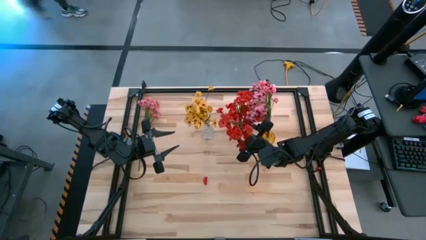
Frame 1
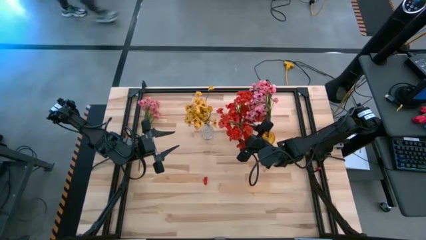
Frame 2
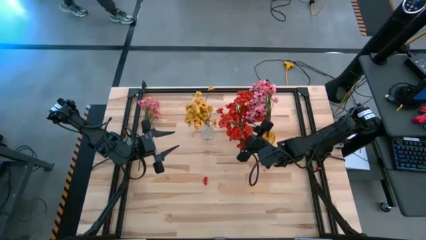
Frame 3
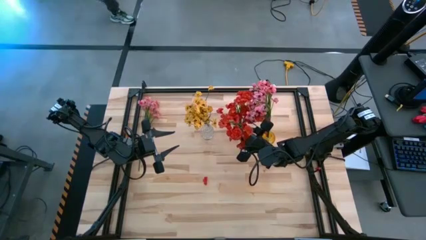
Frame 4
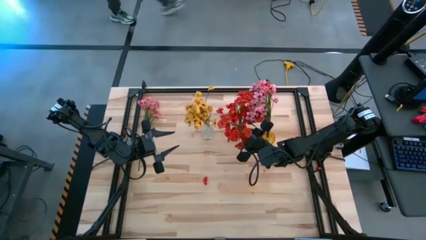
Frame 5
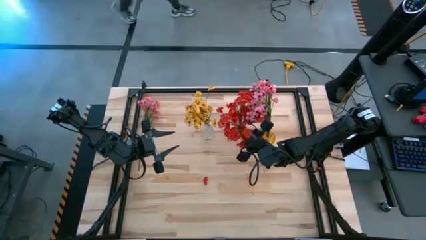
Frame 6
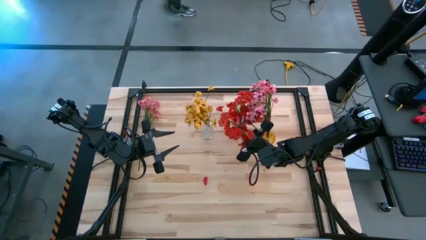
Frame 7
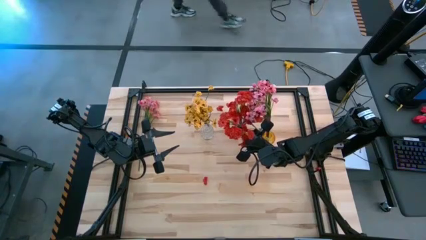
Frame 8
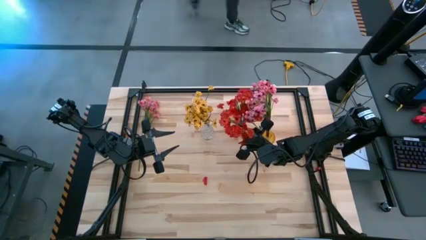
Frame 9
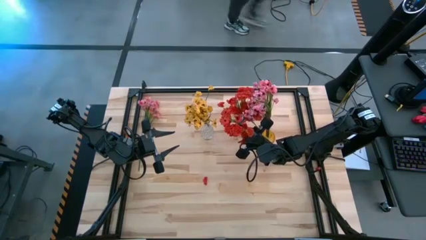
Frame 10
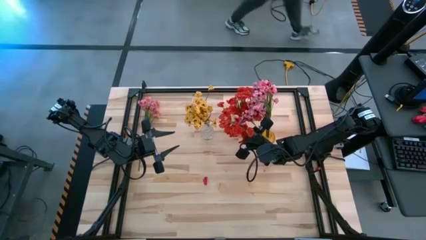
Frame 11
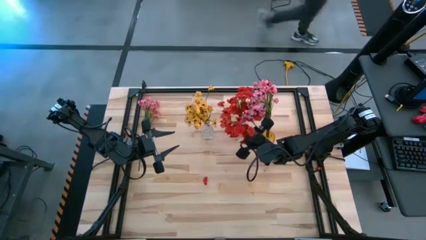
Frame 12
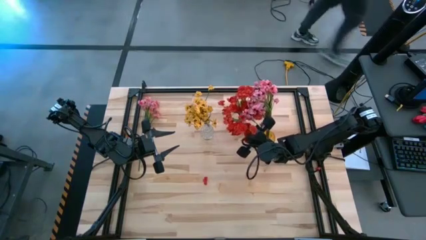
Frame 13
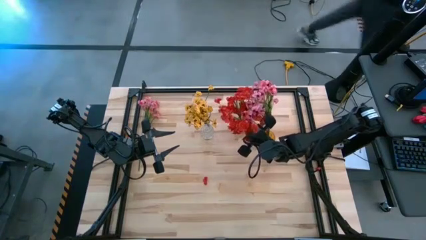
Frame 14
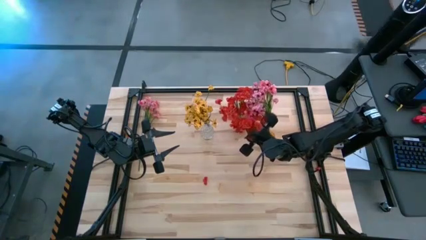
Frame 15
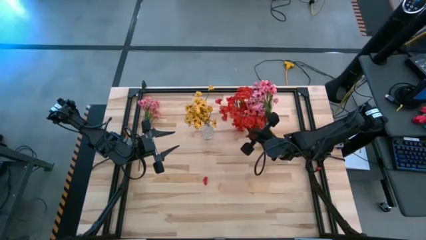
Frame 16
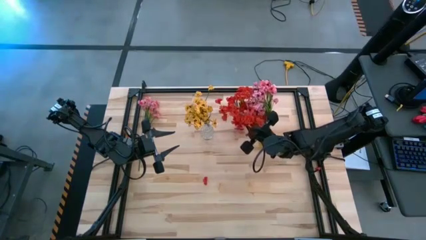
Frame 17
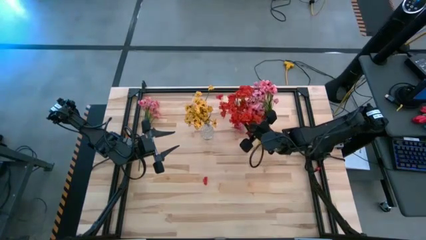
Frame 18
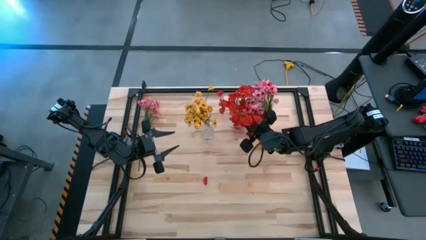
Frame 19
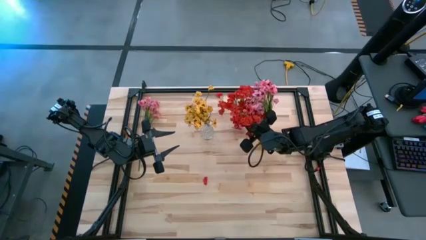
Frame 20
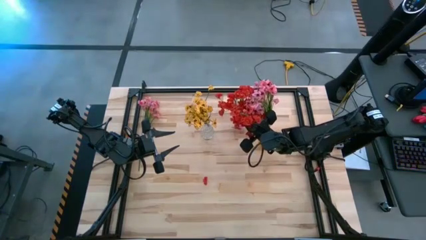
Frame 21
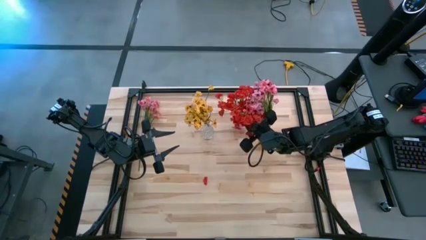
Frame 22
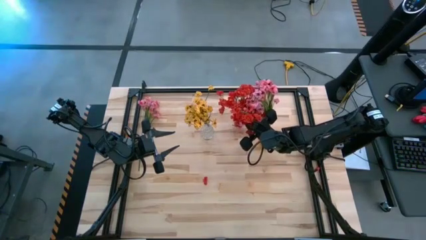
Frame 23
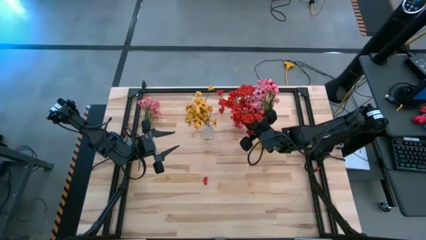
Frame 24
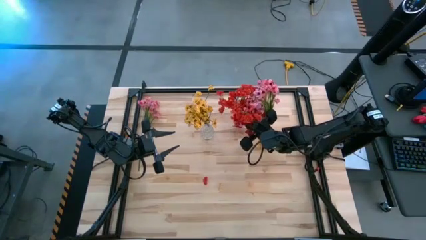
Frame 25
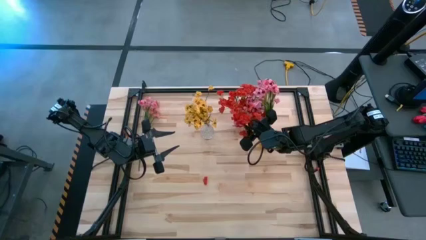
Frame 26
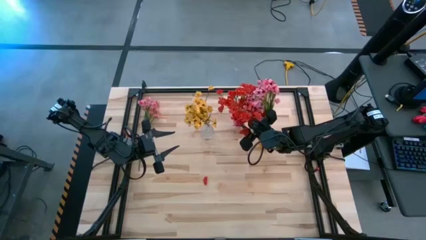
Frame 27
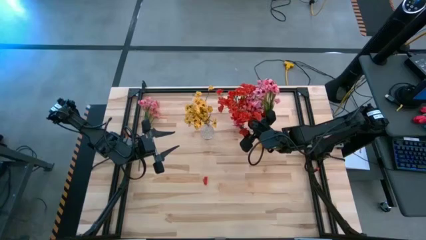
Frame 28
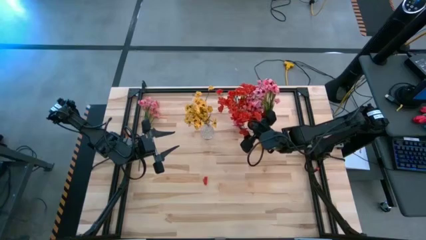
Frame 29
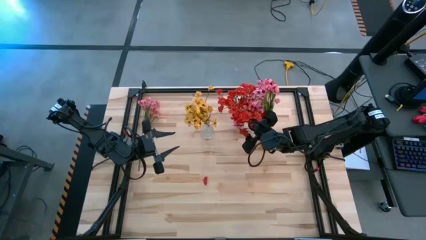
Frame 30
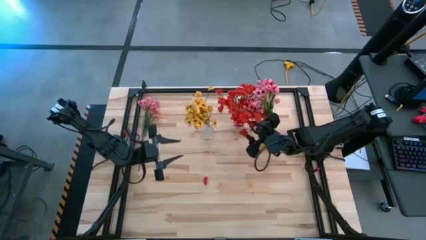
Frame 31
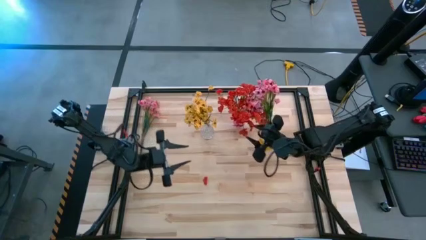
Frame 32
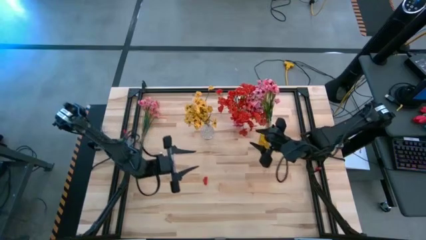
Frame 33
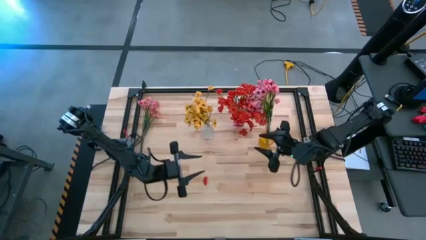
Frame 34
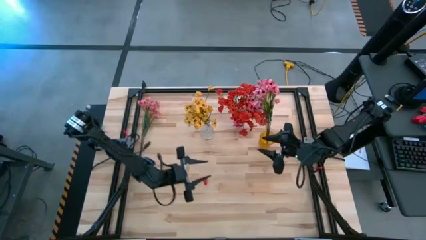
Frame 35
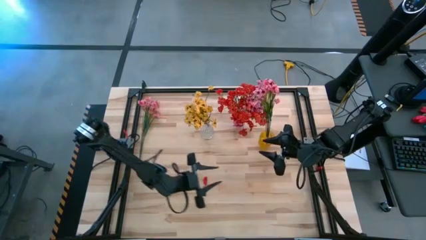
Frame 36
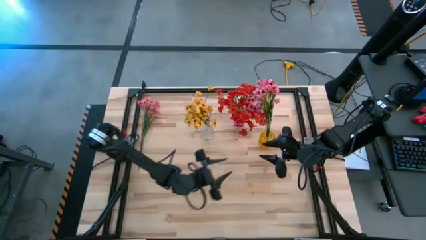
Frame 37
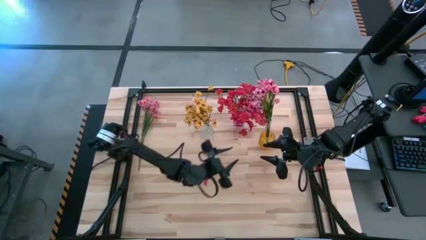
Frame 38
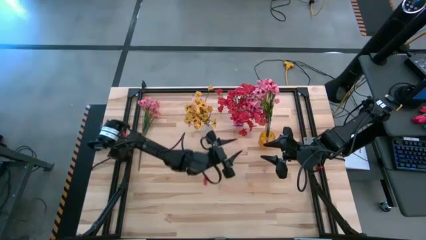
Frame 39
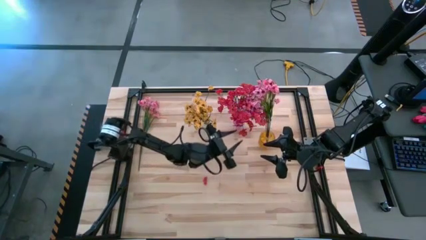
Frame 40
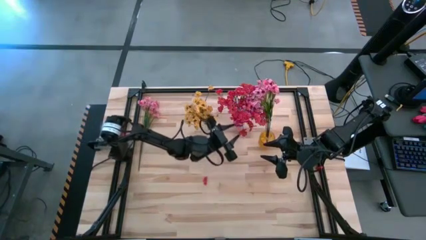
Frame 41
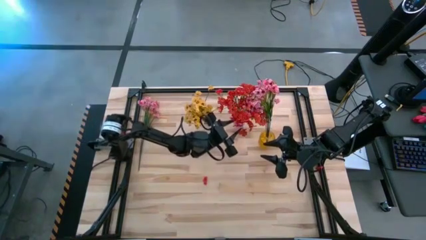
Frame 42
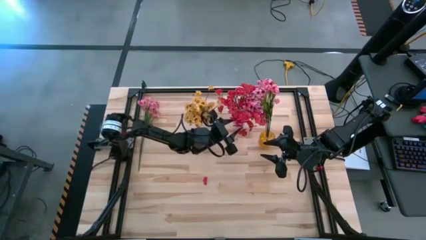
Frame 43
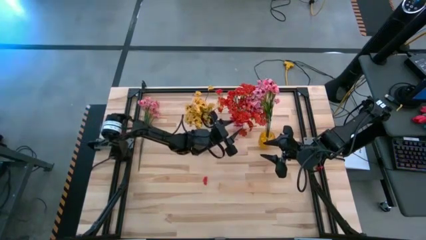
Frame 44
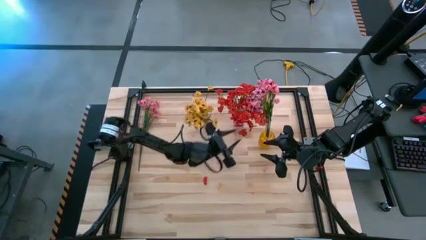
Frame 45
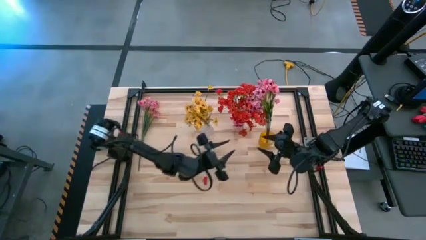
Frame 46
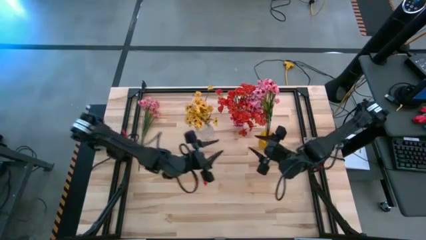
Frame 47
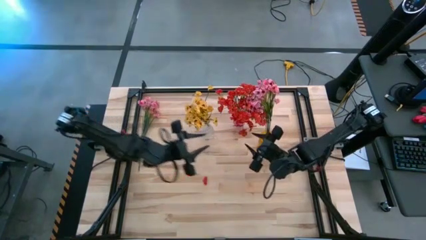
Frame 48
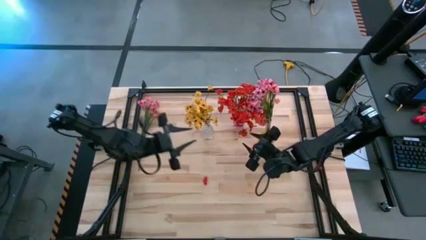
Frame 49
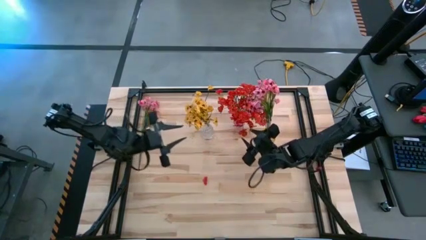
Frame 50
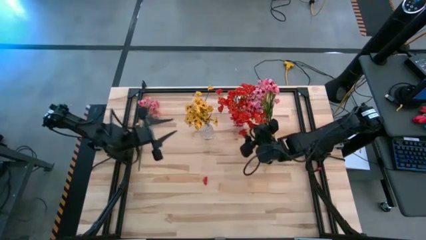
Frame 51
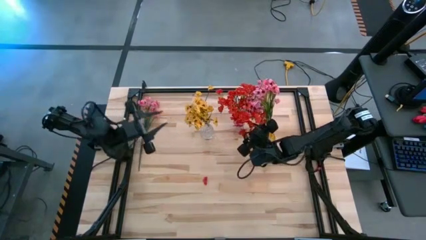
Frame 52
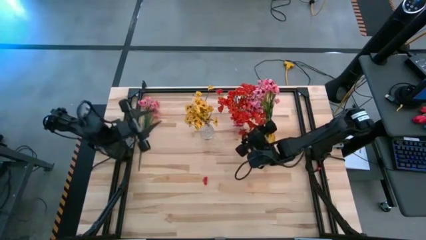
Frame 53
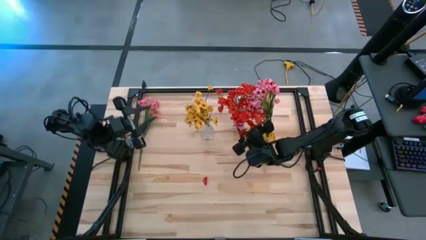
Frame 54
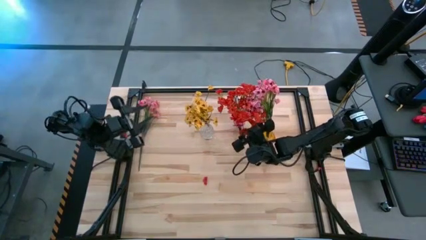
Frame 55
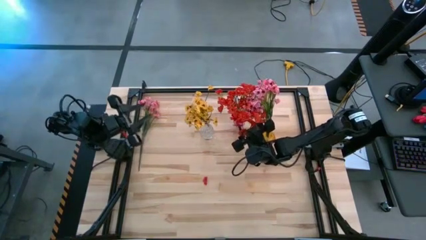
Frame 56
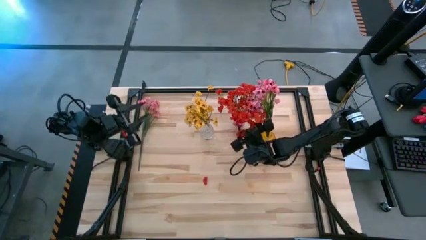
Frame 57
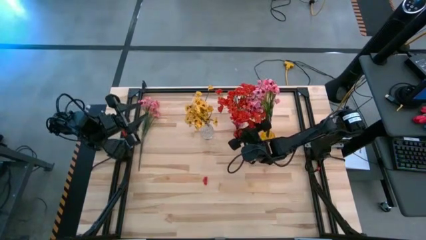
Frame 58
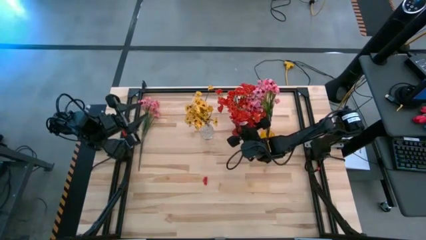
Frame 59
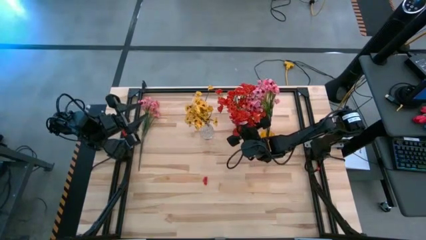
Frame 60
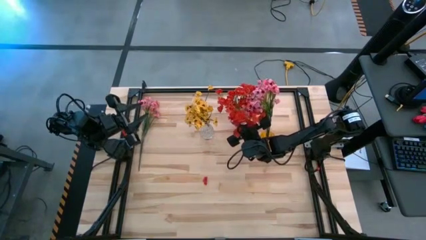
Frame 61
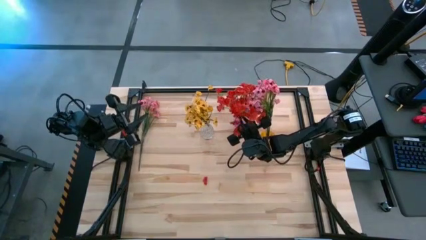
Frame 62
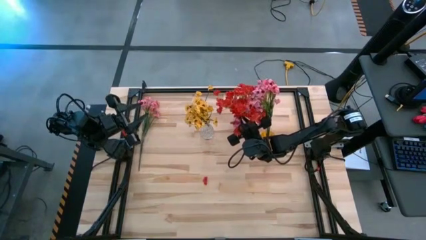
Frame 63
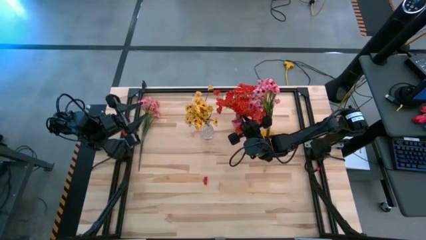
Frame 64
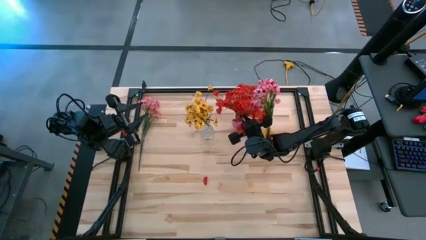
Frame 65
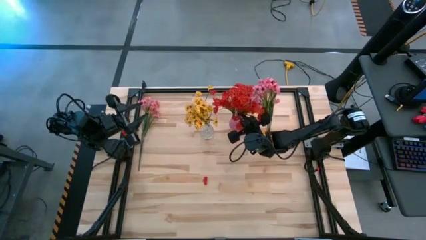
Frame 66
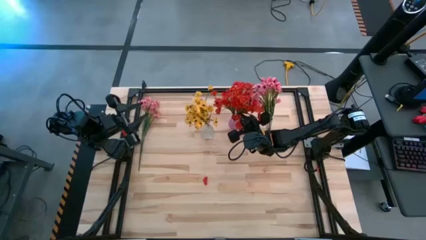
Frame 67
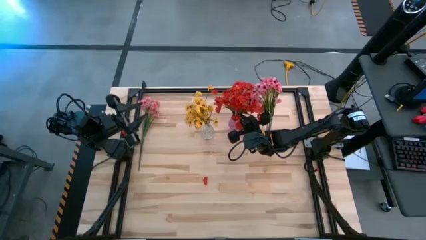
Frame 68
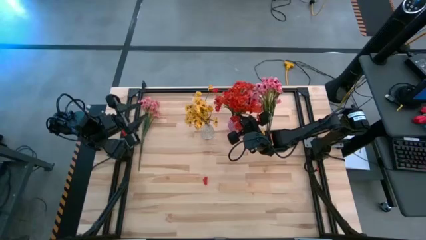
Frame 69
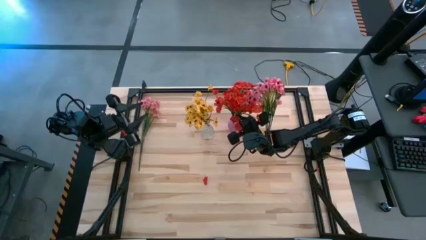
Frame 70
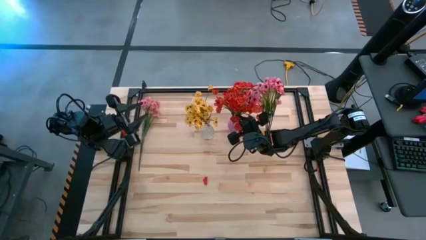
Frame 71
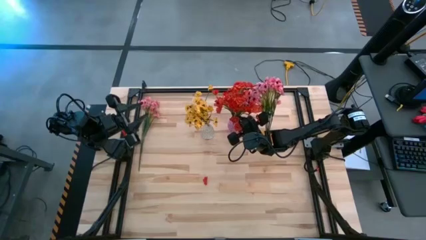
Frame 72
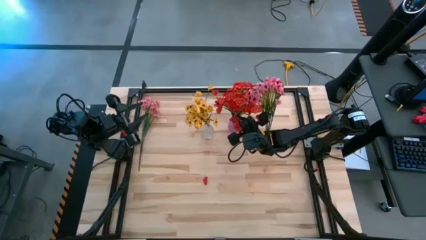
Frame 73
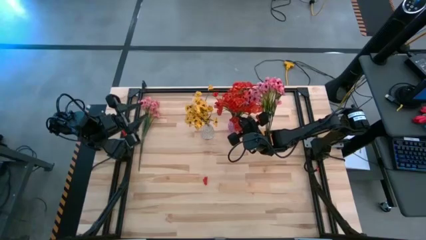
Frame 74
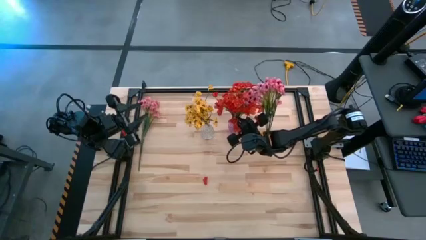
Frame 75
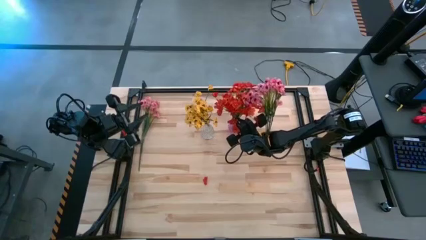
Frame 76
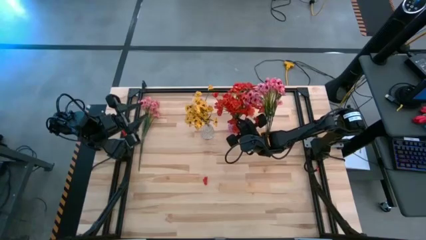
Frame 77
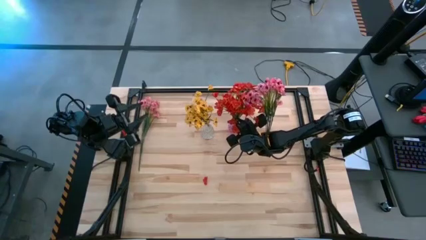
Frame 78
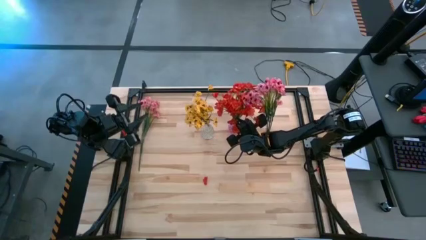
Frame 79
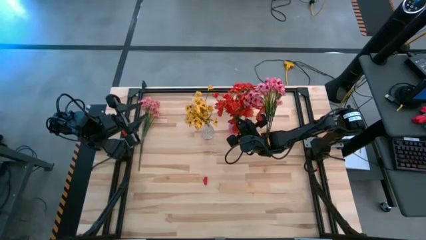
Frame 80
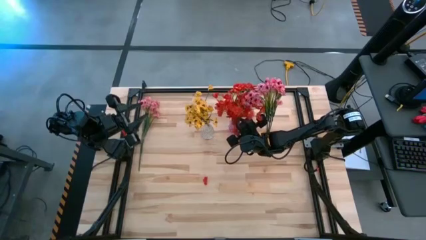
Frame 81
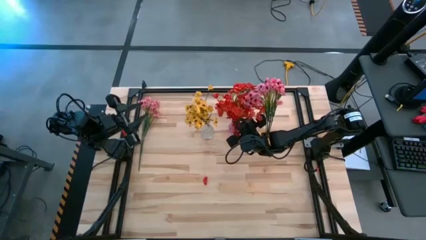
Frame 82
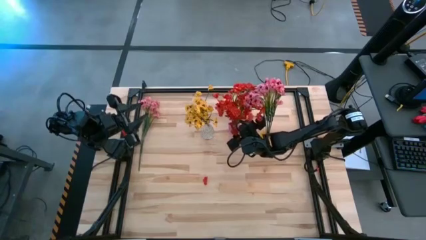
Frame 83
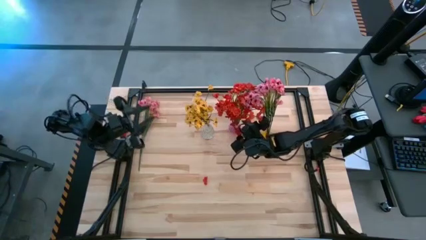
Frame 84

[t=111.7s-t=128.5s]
Task: Sort flowers into vase by color
Put the red flowers into the pink vase
